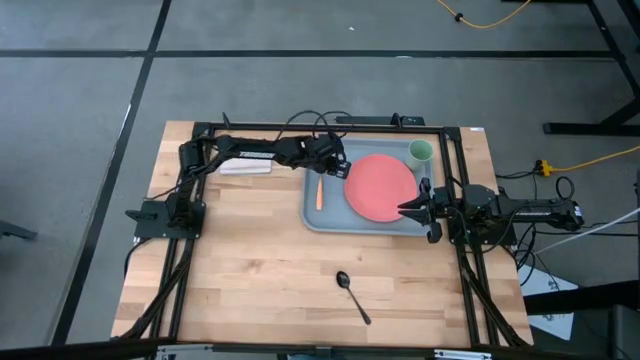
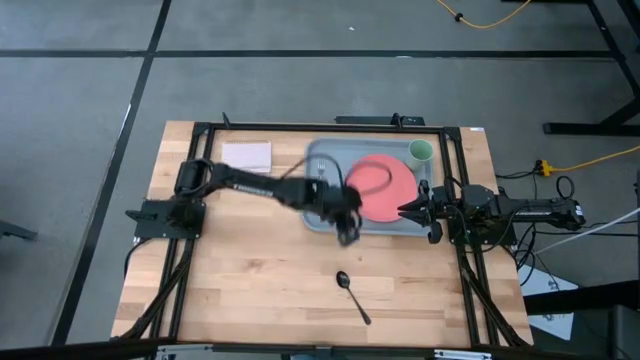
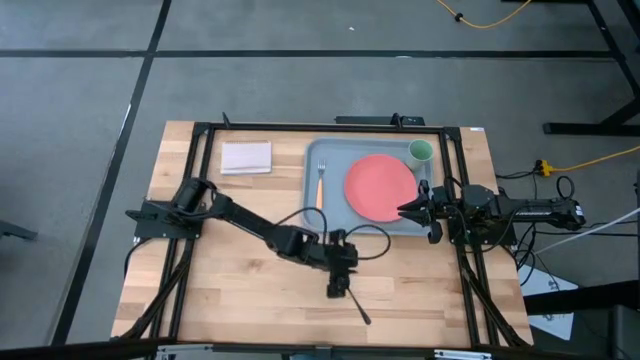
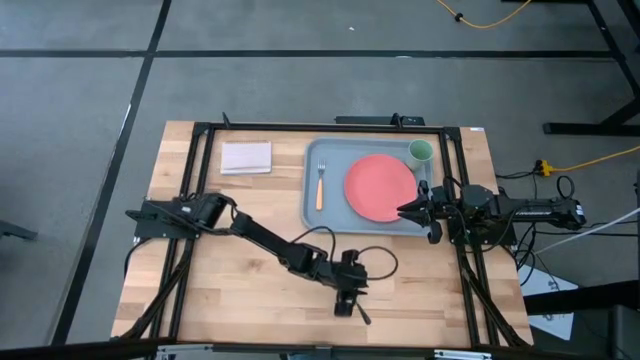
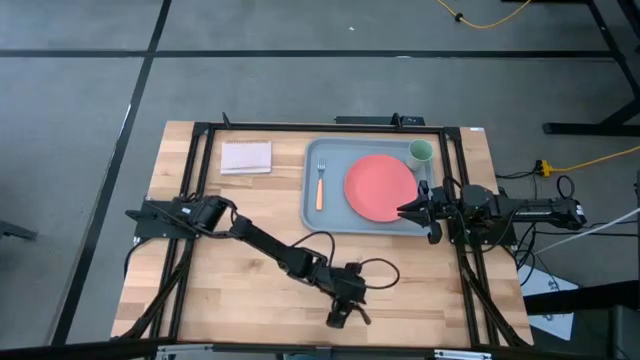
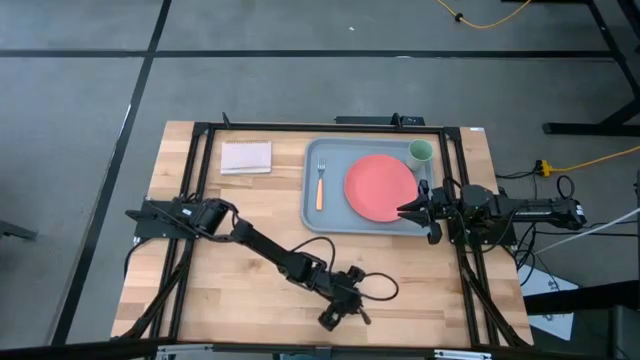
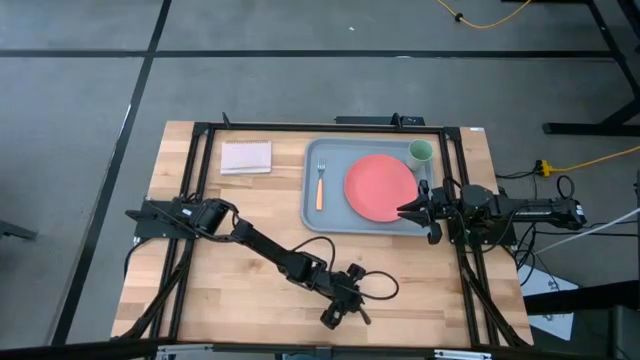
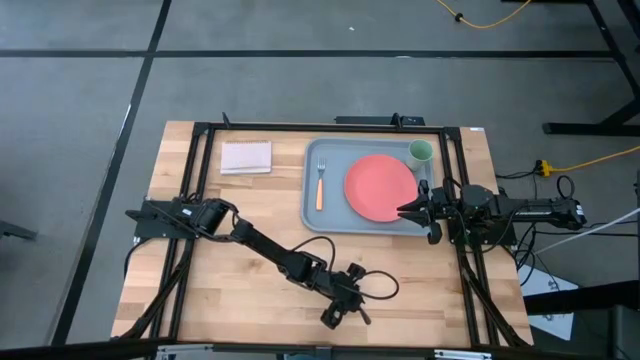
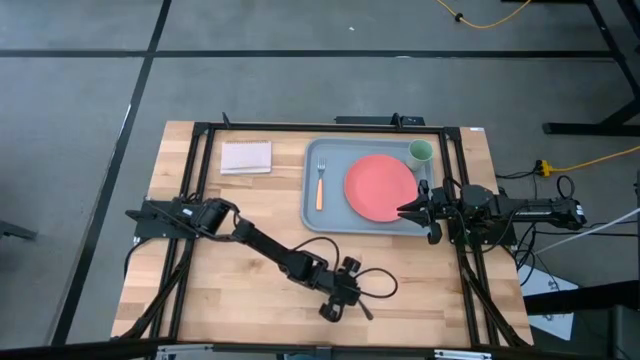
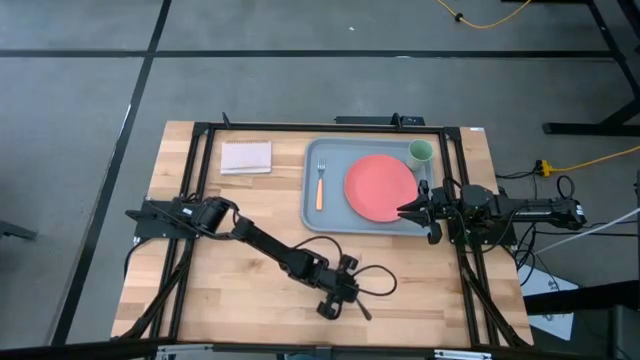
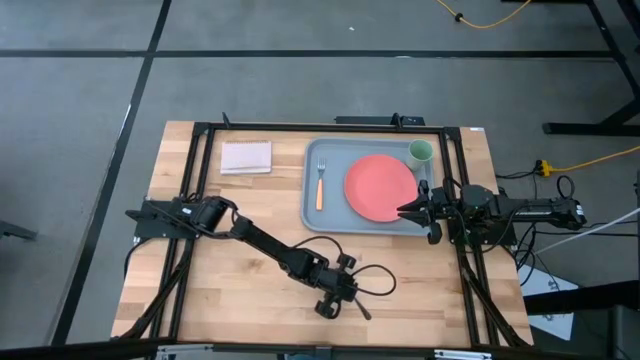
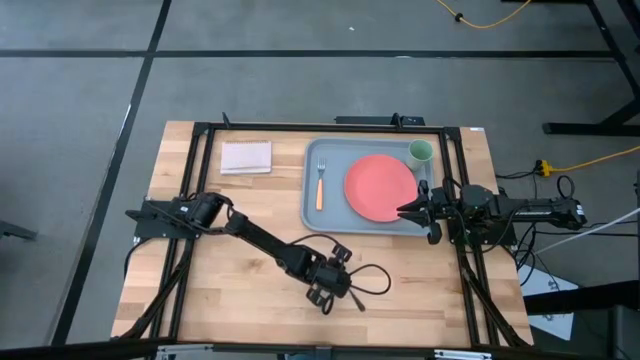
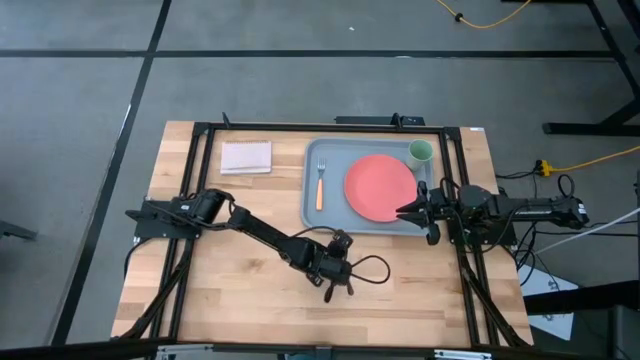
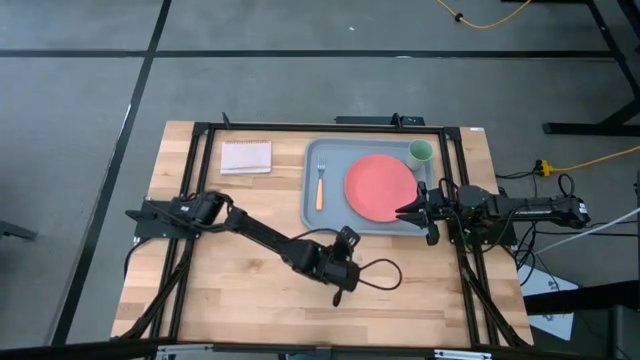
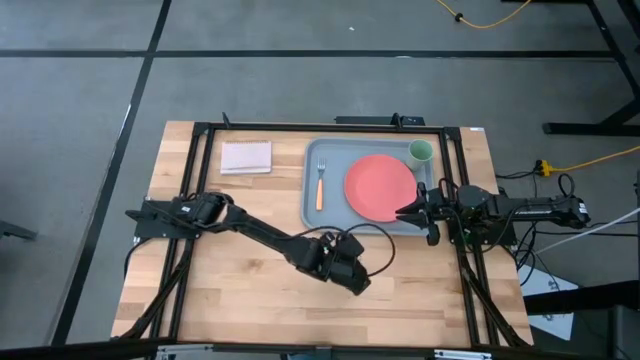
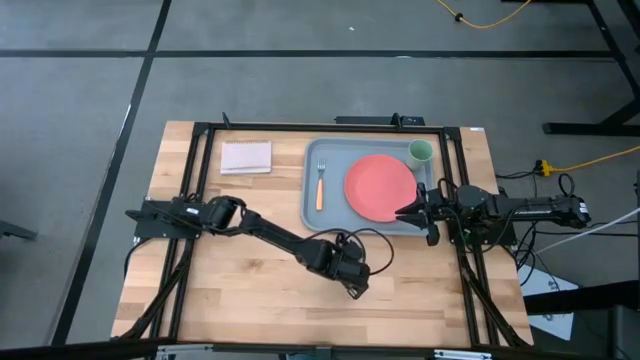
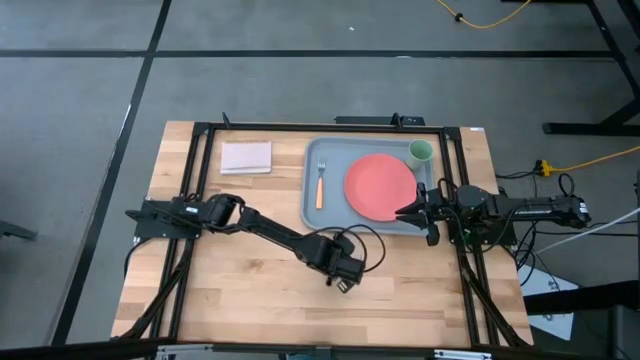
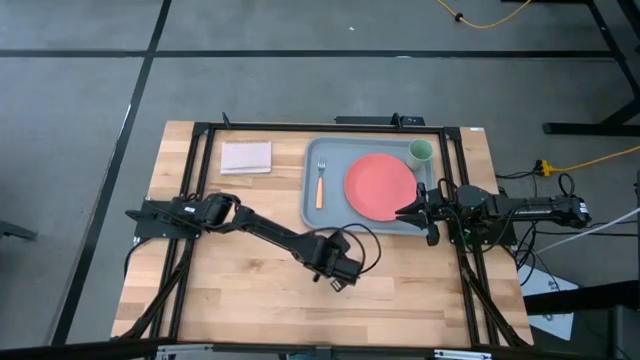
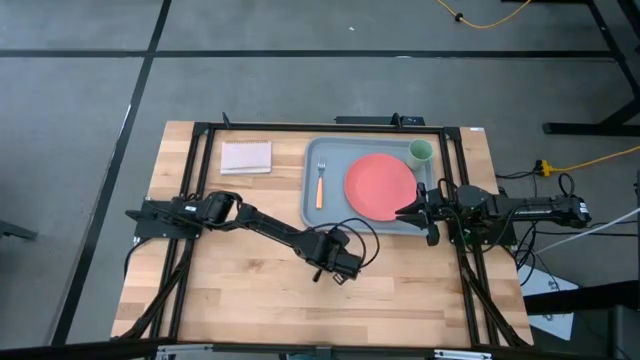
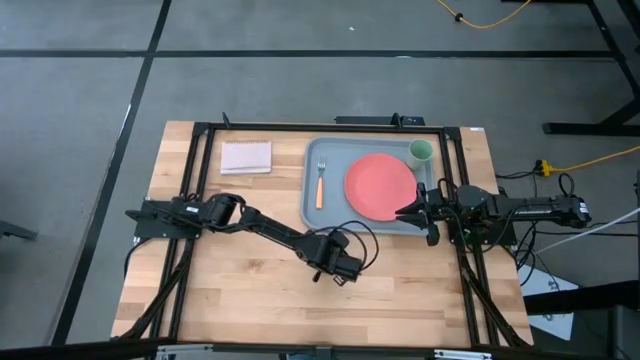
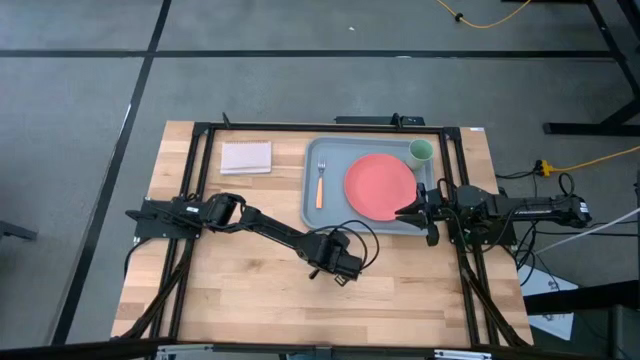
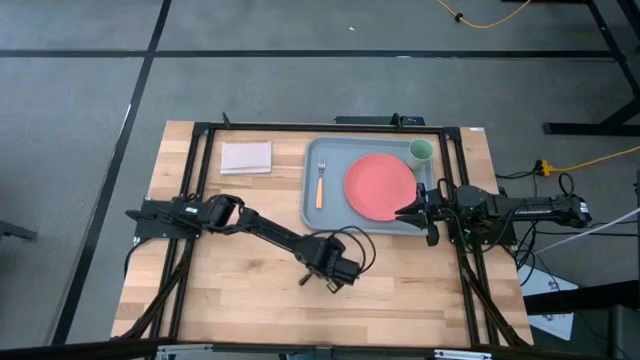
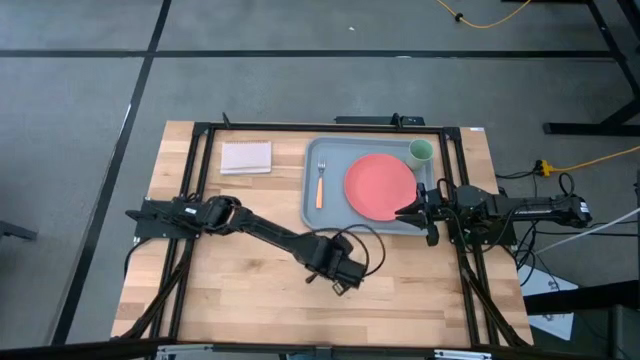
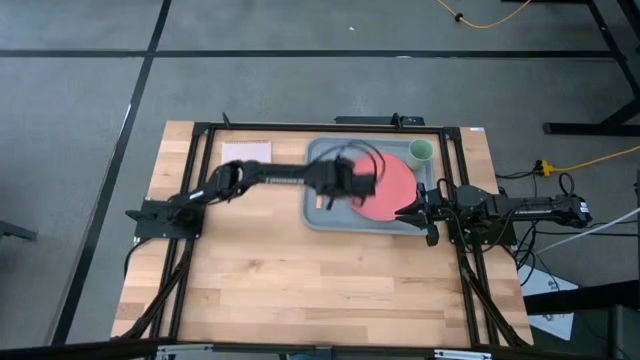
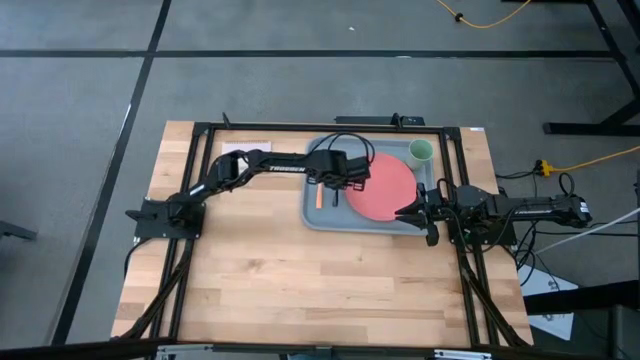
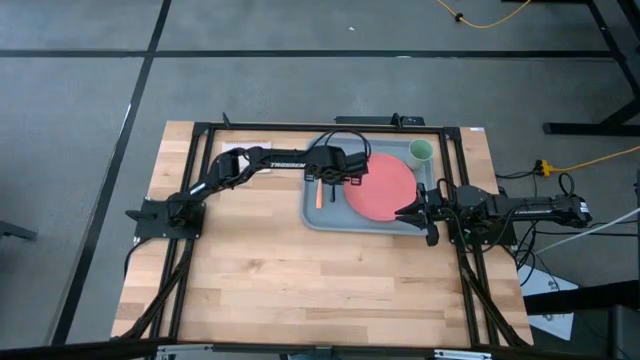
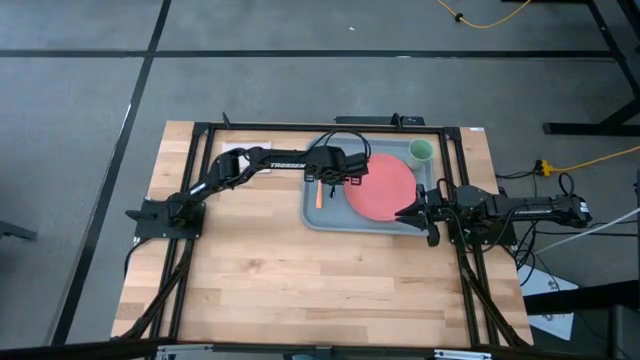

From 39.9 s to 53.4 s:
Task: Pick and place plate/cup/fork/spoon on tray
Put the black spoon beside the yellow fork on the gray serving tray

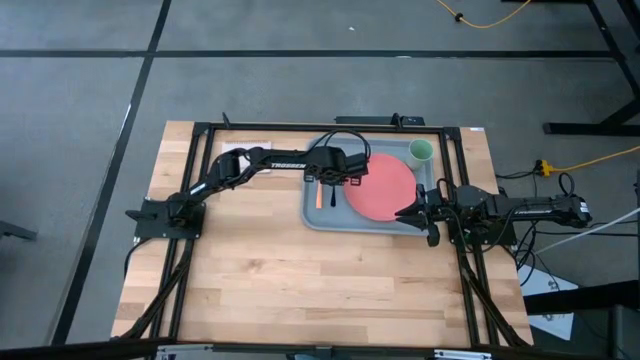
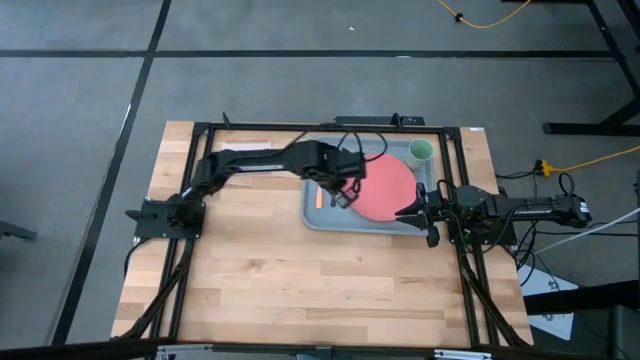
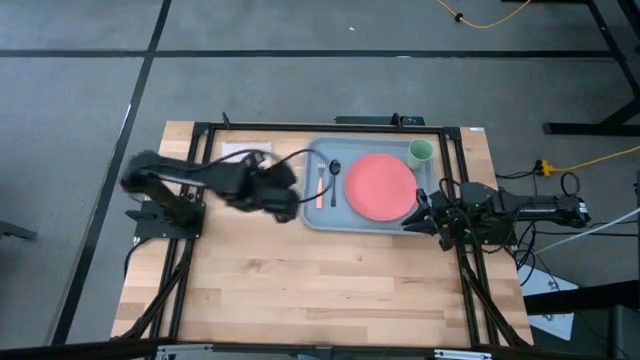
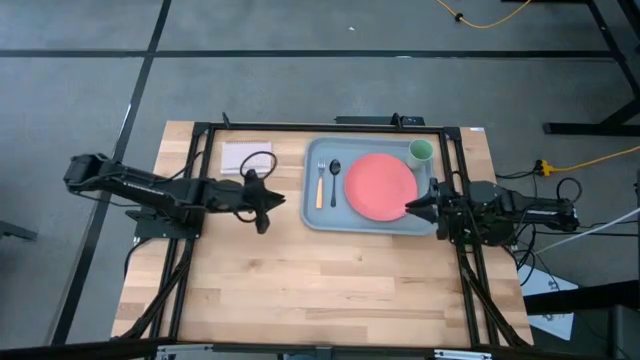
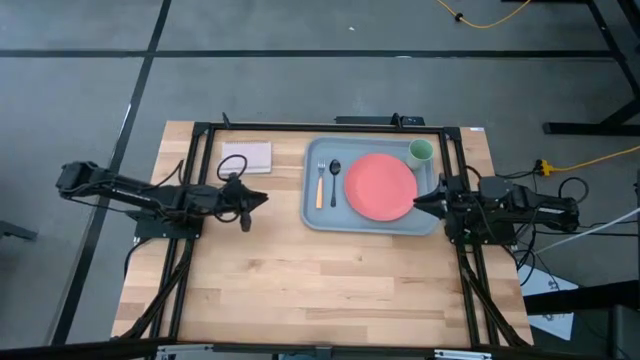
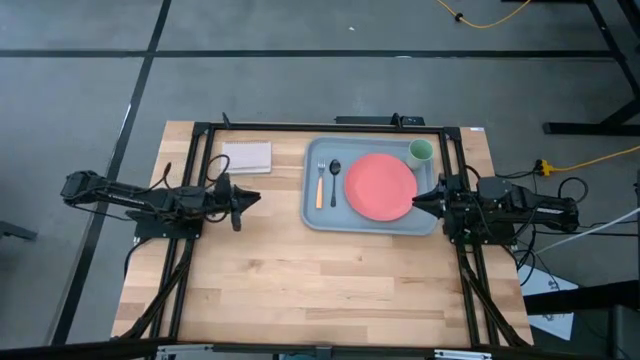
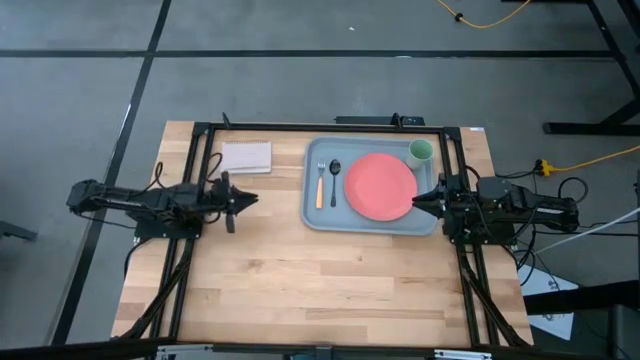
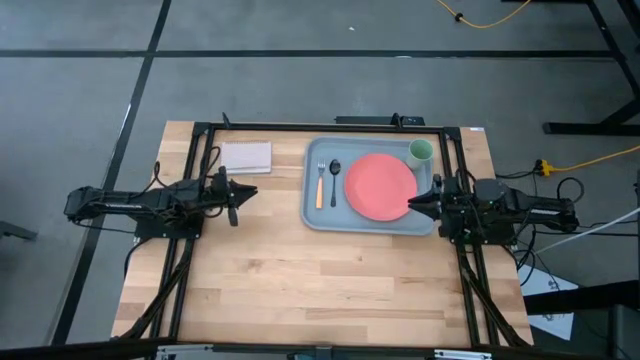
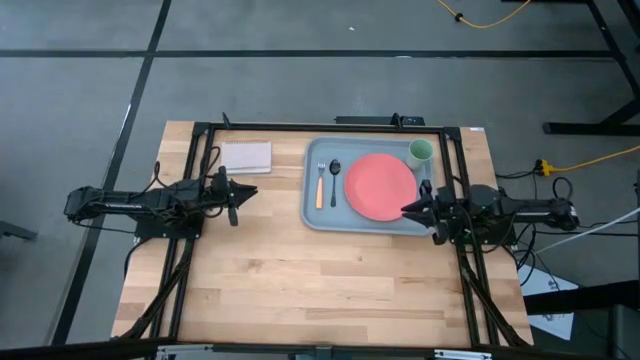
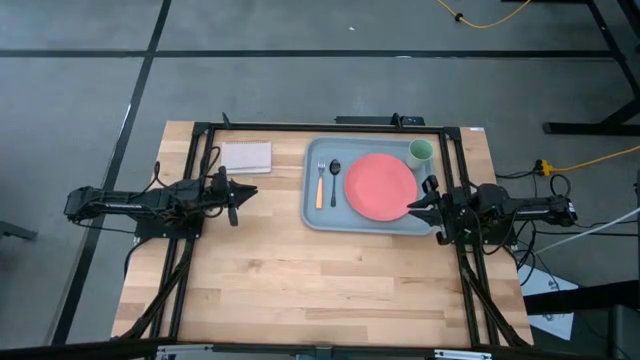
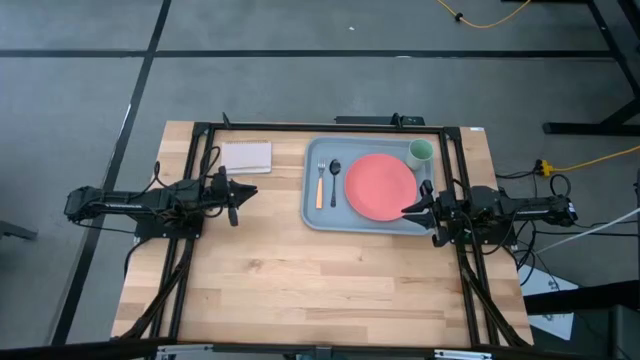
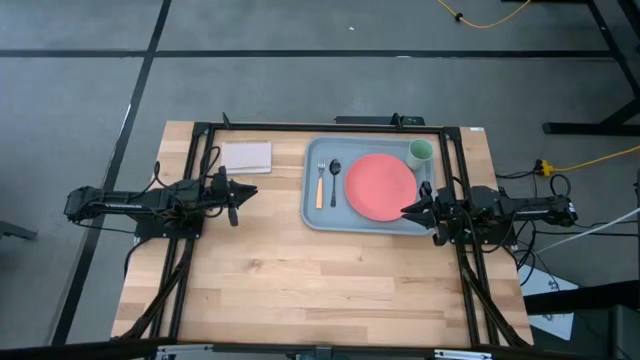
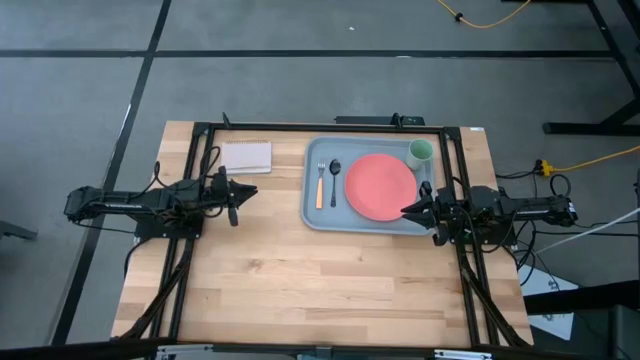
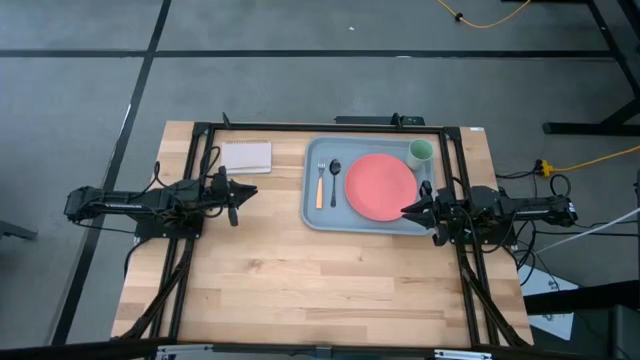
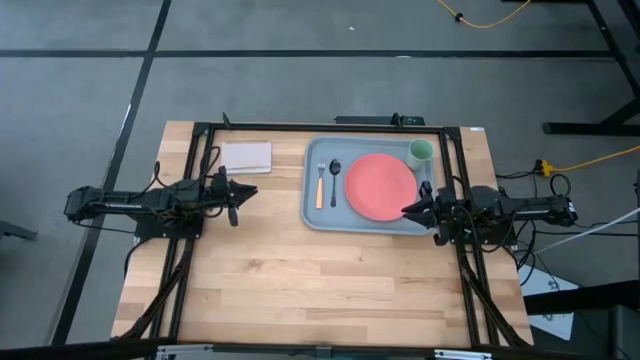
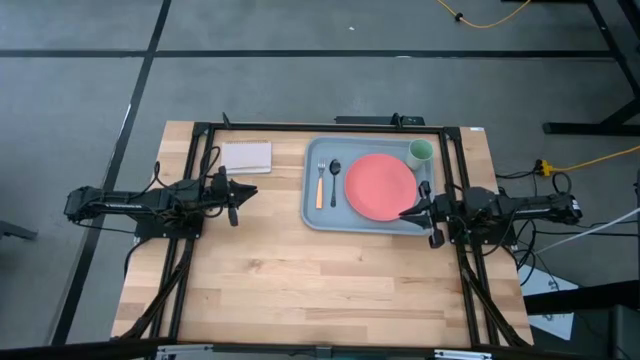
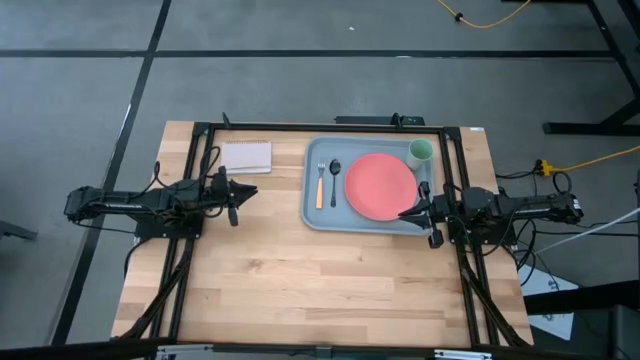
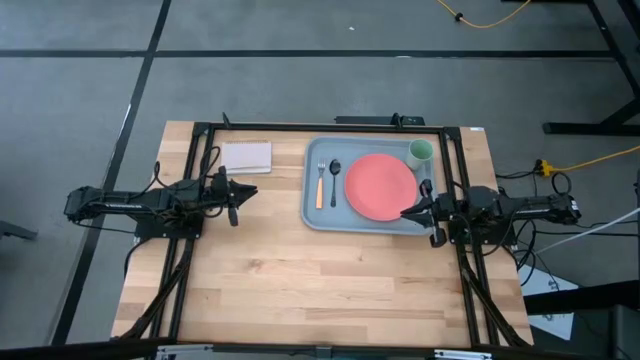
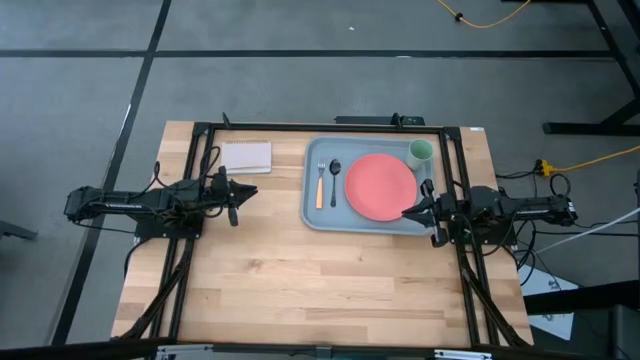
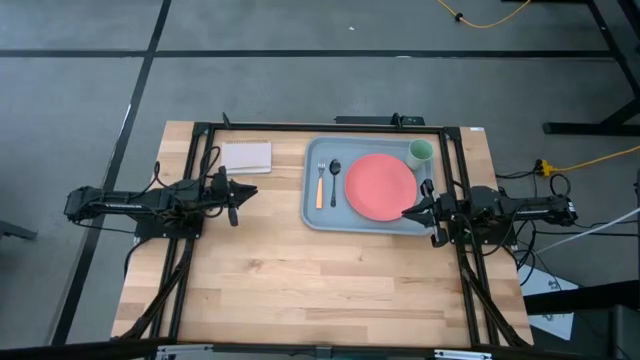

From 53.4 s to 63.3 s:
Return to Home Position
